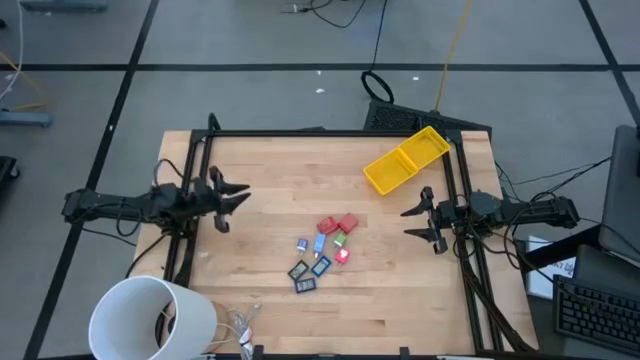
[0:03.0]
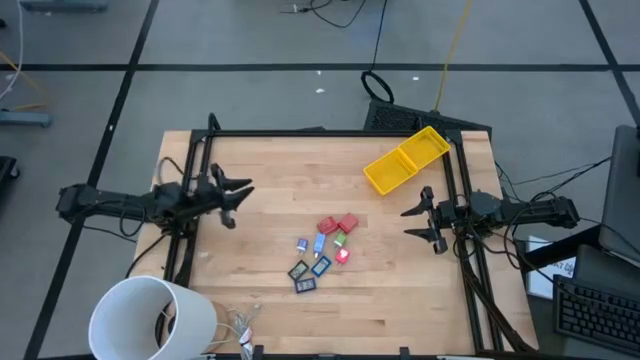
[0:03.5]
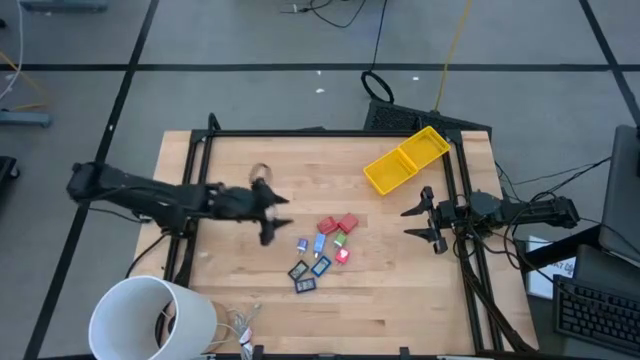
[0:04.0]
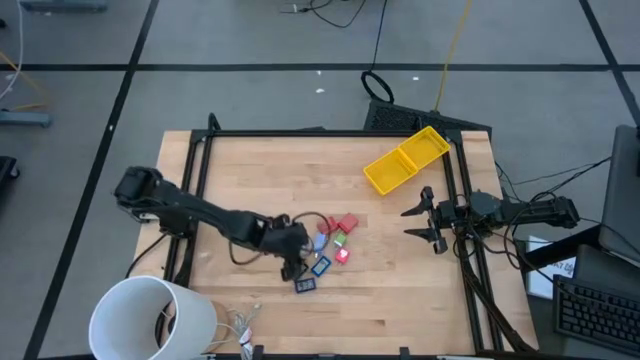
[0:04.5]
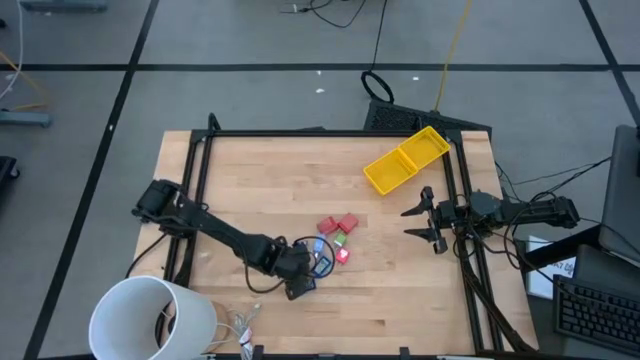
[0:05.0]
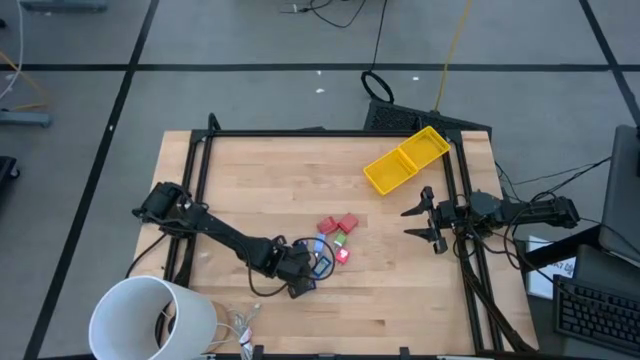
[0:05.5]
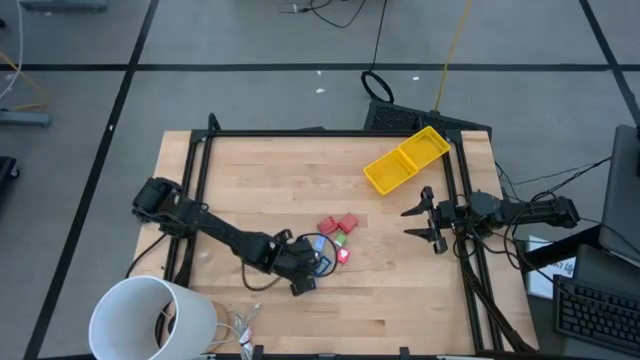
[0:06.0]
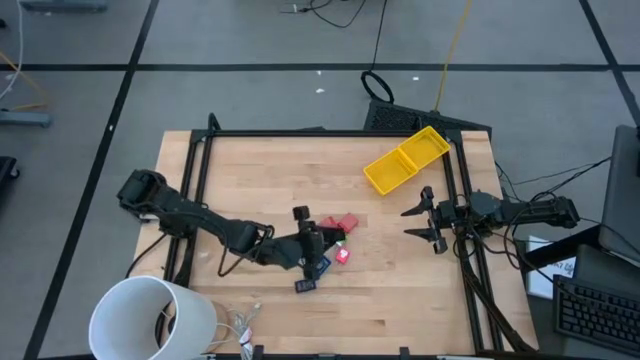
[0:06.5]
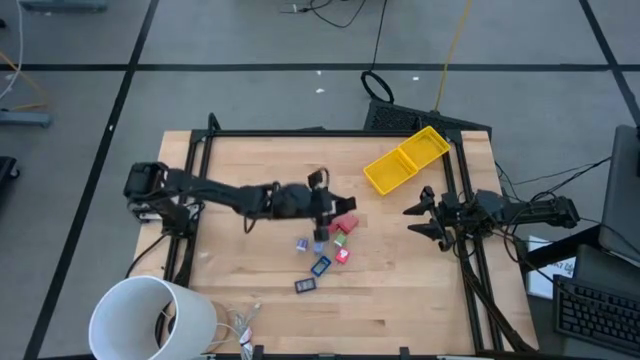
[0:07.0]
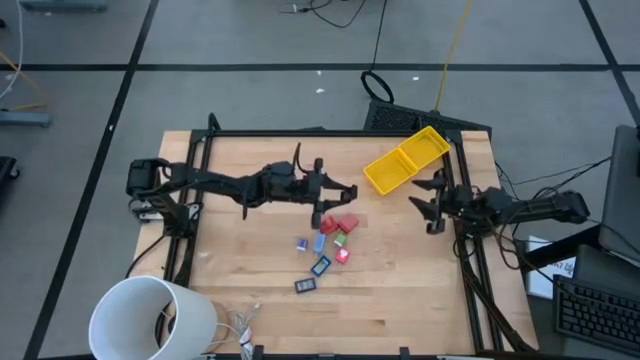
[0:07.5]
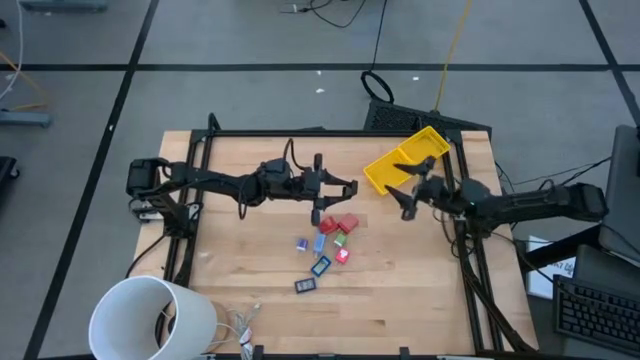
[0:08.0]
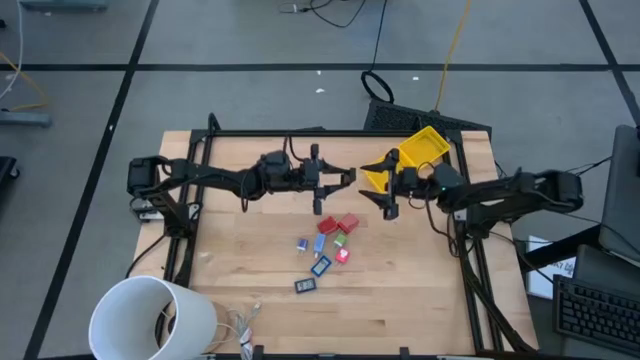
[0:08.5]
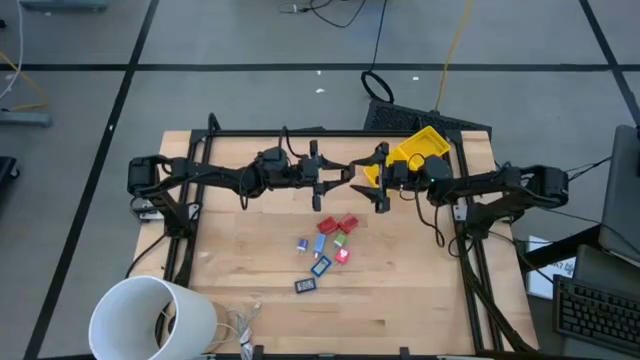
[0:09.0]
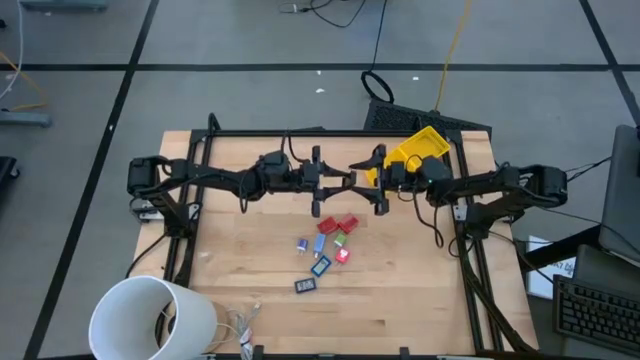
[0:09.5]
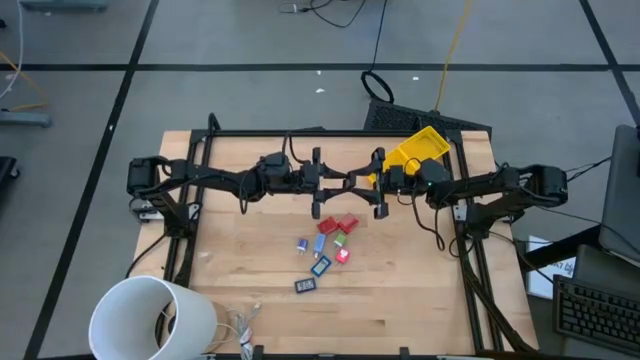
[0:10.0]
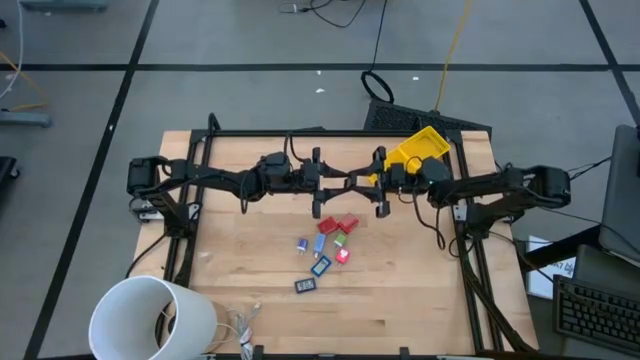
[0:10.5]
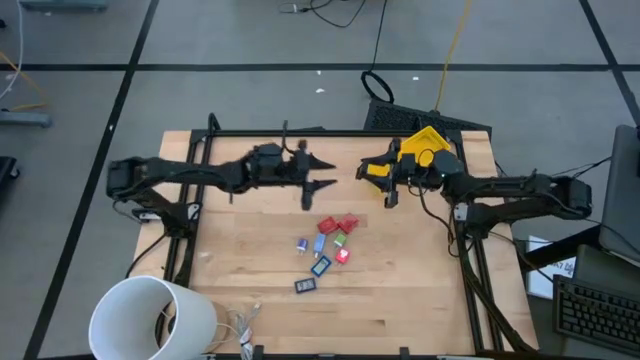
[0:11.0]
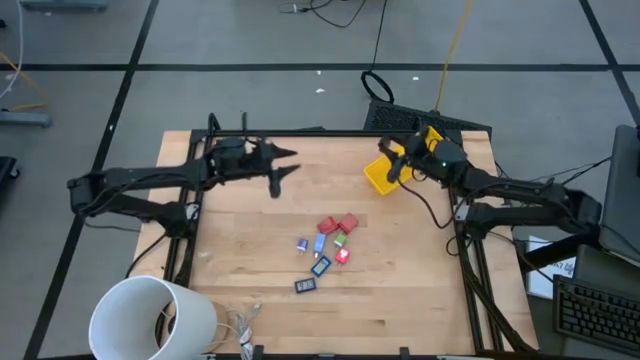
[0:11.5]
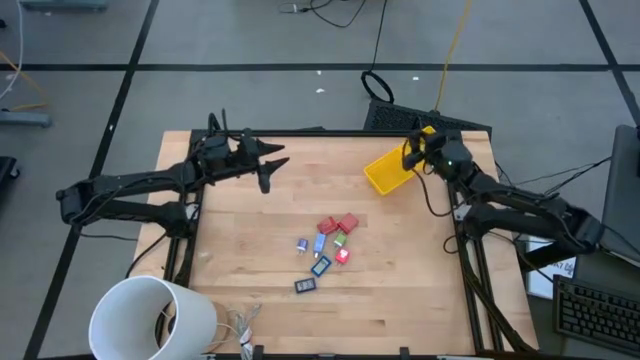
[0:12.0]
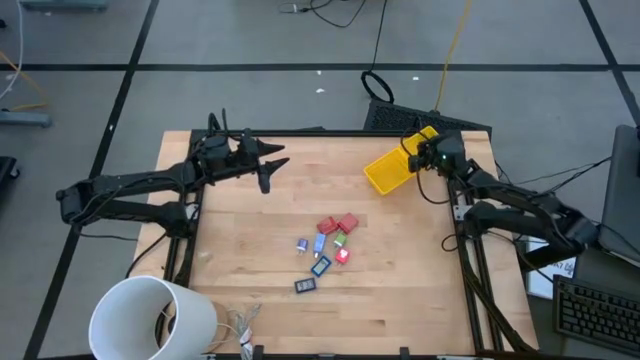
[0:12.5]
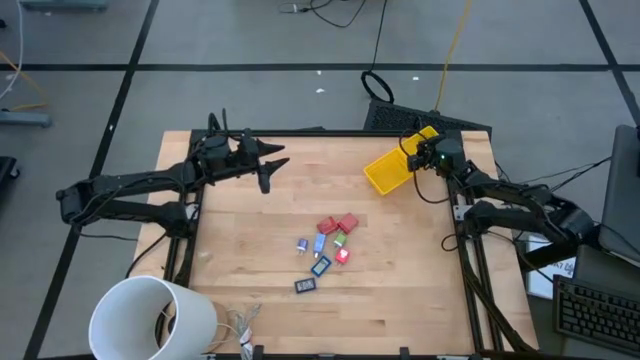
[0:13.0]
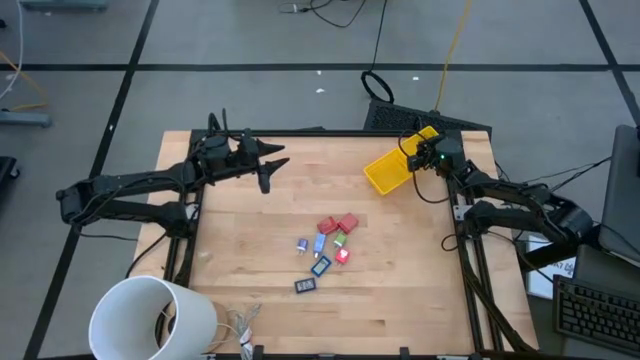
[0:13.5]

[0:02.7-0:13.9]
Task: Pick & Place Office items
Put the black digital clock into the right yellow bin

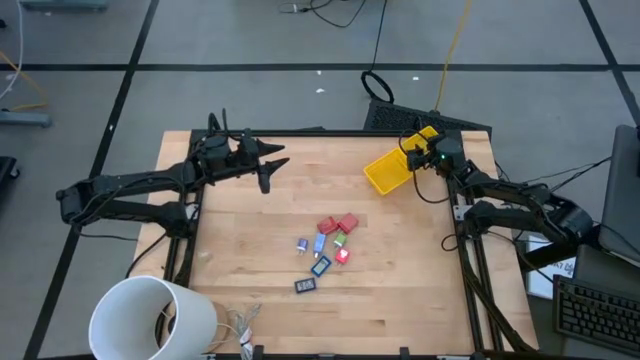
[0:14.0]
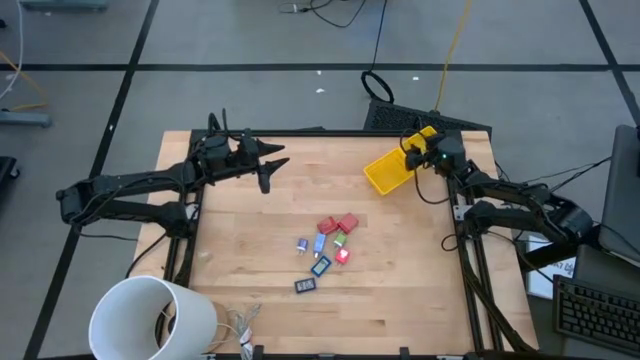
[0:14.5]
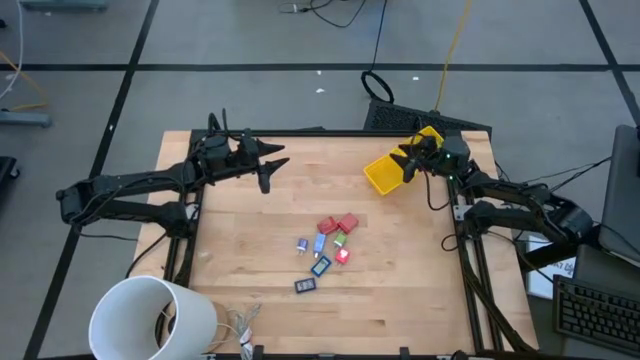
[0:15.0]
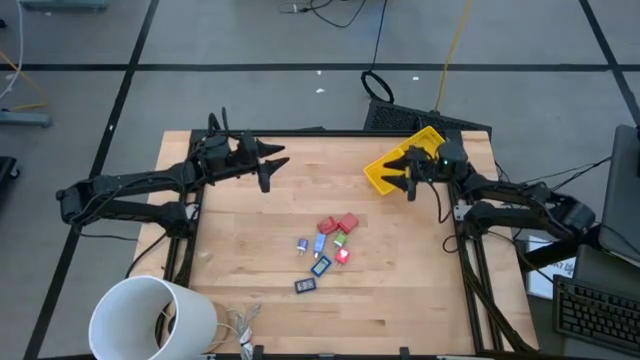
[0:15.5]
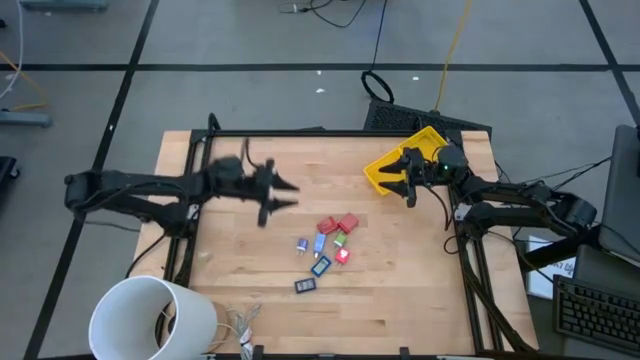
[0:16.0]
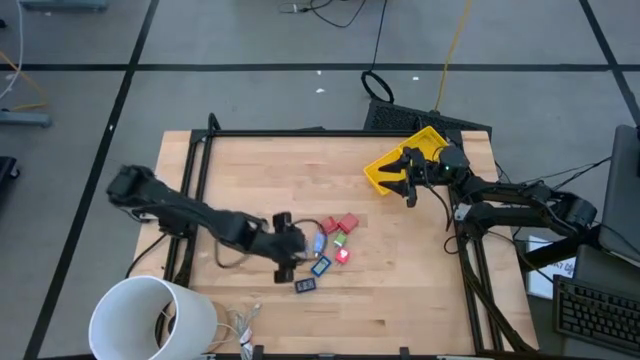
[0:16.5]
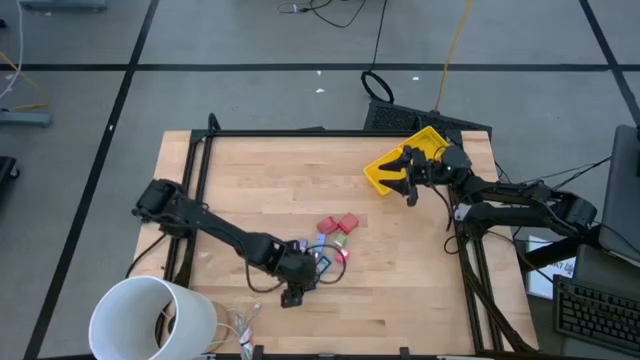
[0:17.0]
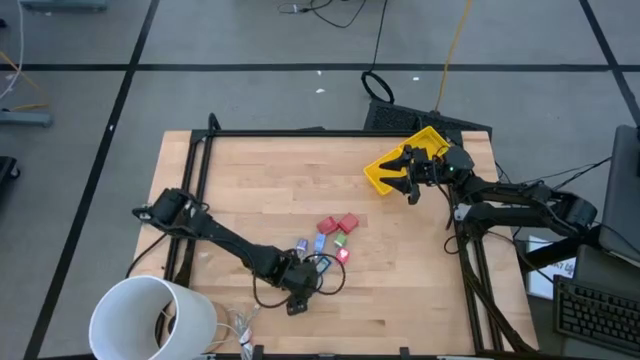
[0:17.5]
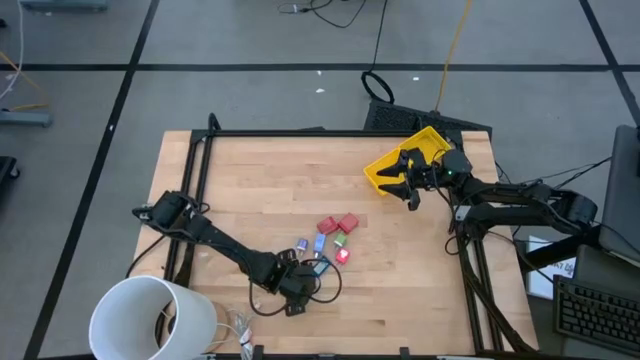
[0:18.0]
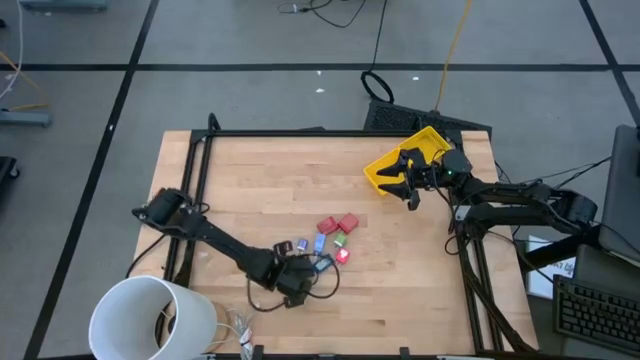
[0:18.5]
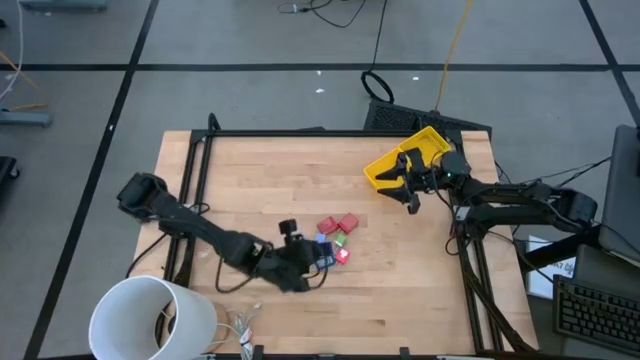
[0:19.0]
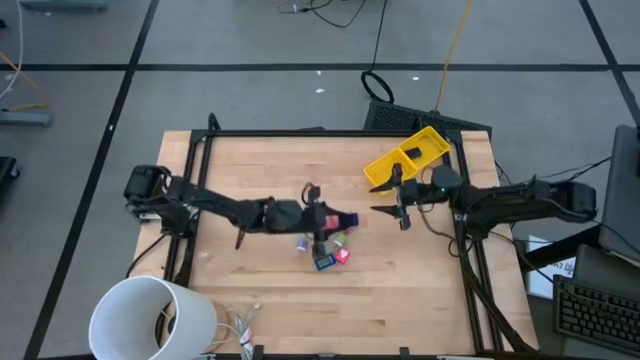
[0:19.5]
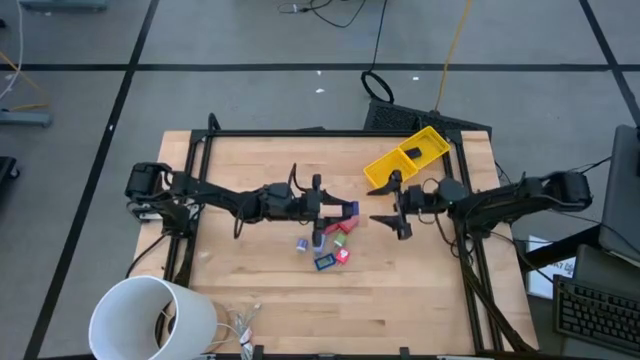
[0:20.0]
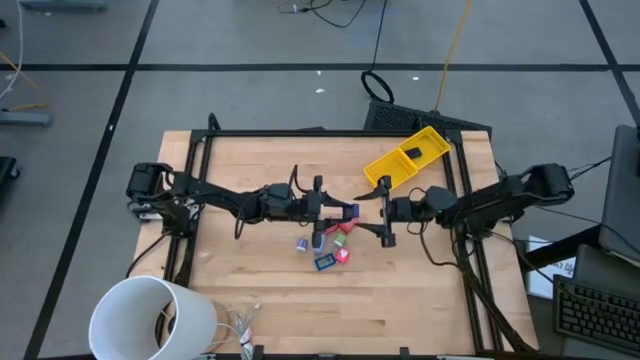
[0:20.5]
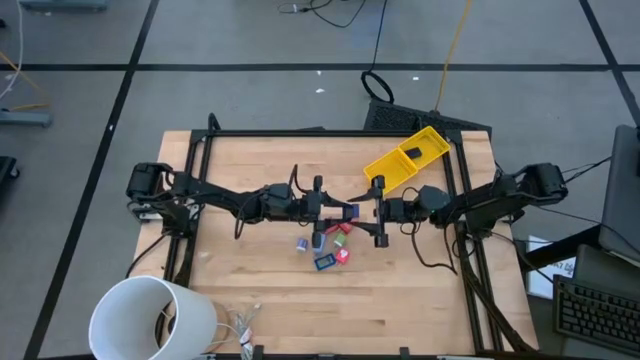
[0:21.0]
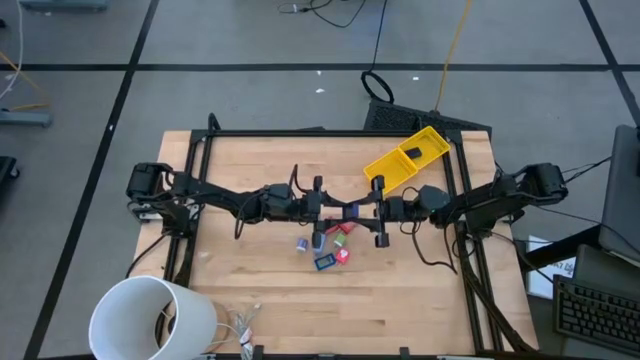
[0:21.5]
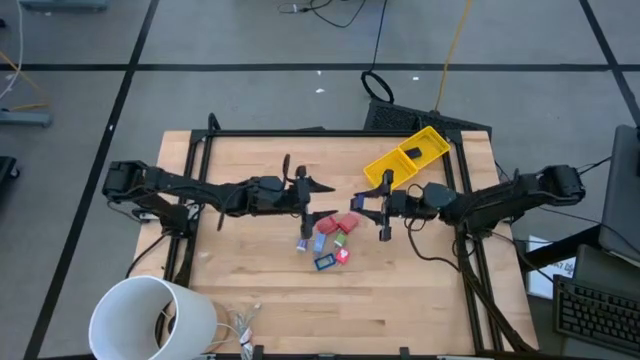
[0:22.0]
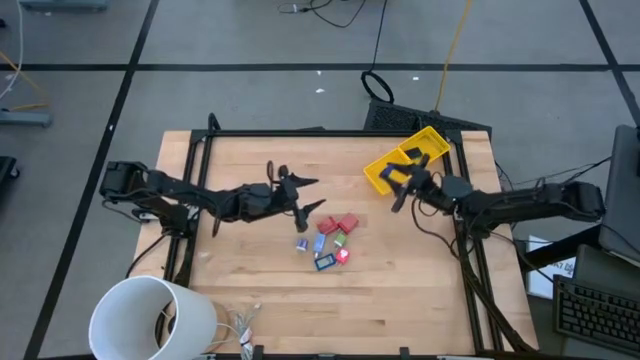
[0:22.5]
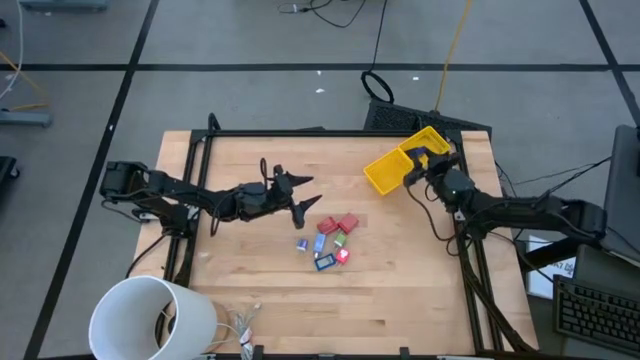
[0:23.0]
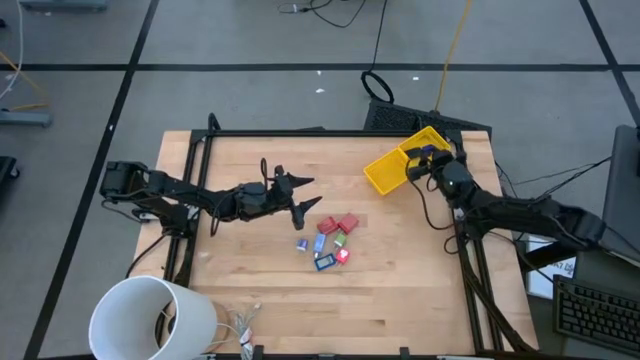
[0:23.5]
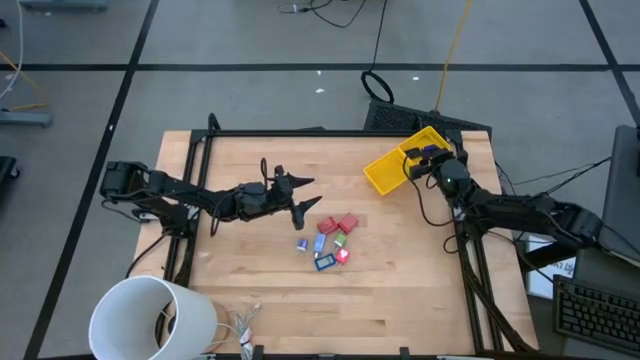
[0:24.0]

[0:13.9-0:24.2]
Put the bottom blue digital clock into the right yellow bin
